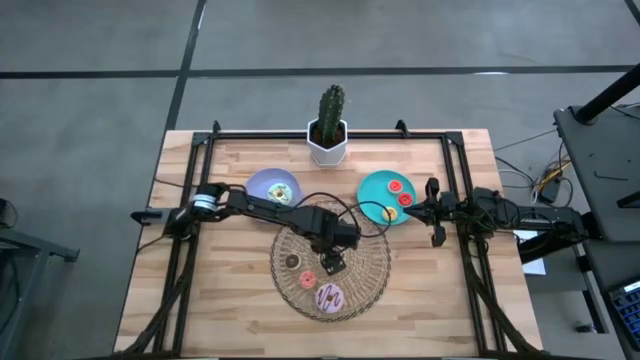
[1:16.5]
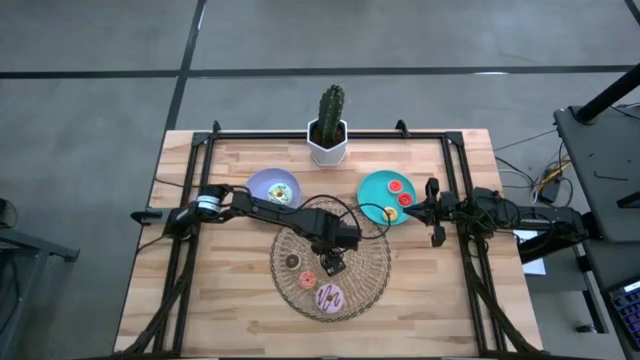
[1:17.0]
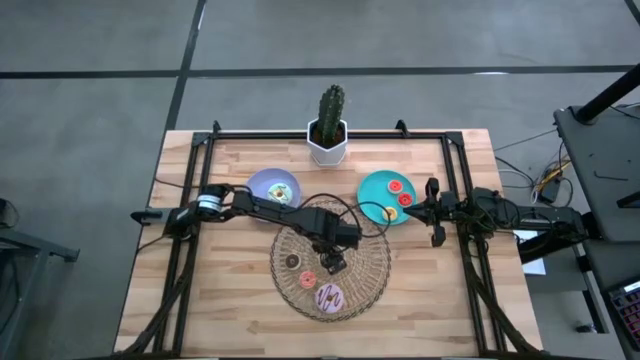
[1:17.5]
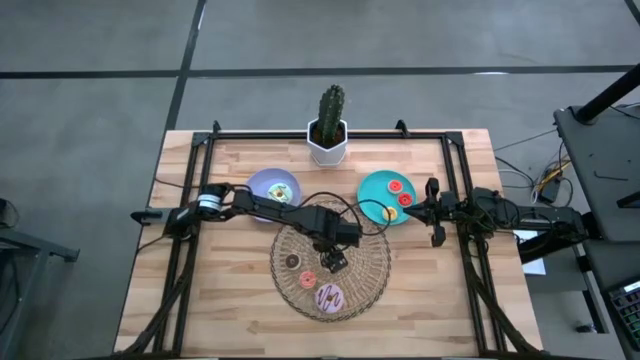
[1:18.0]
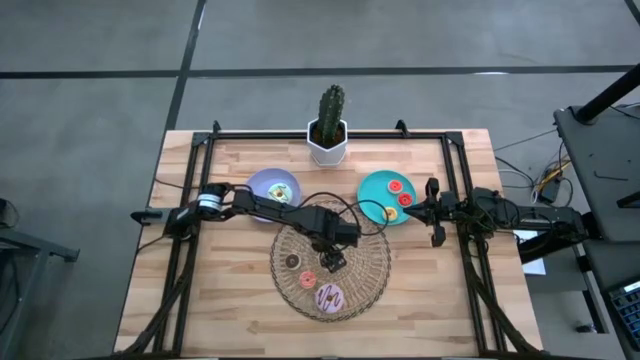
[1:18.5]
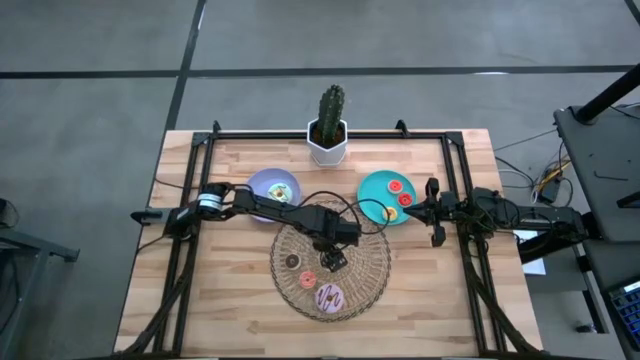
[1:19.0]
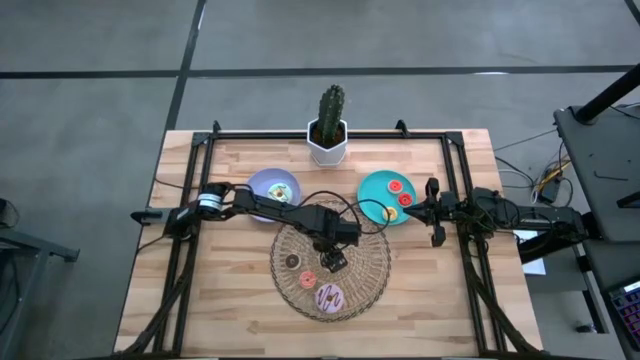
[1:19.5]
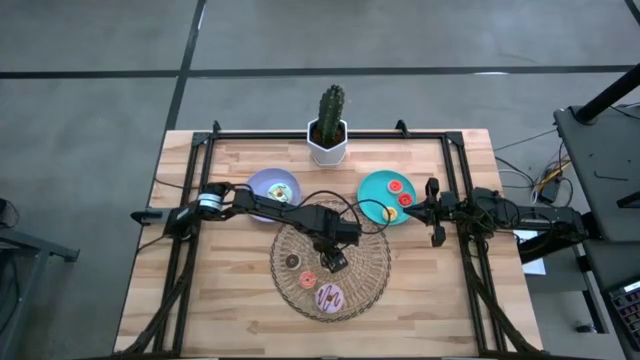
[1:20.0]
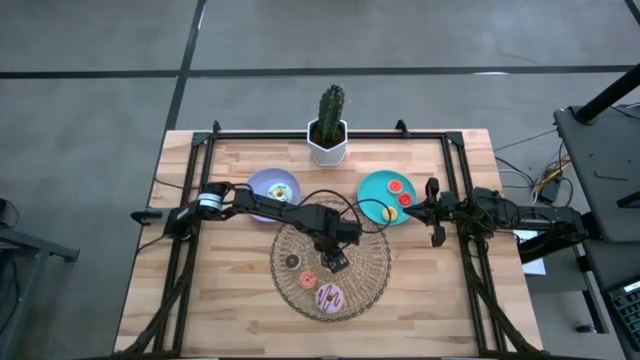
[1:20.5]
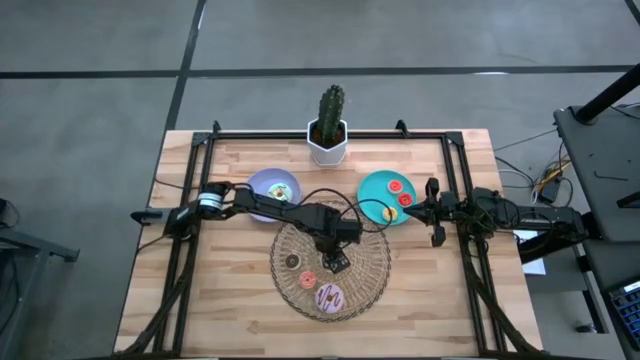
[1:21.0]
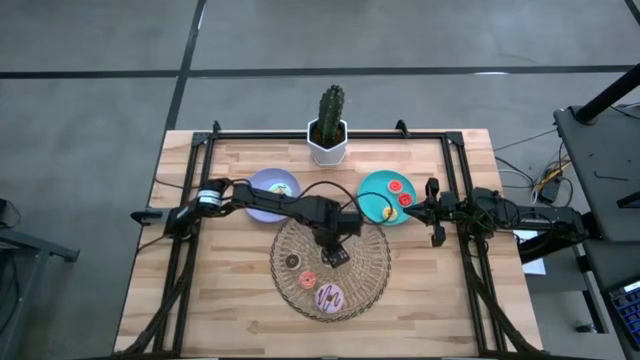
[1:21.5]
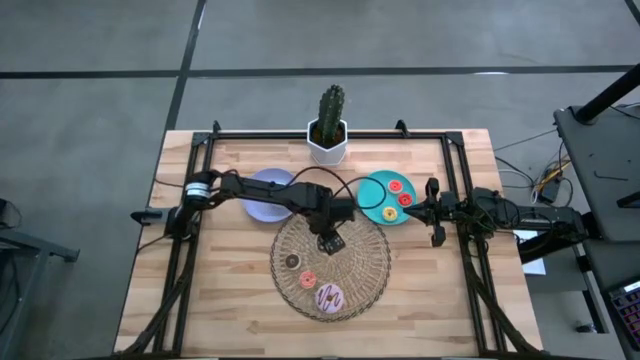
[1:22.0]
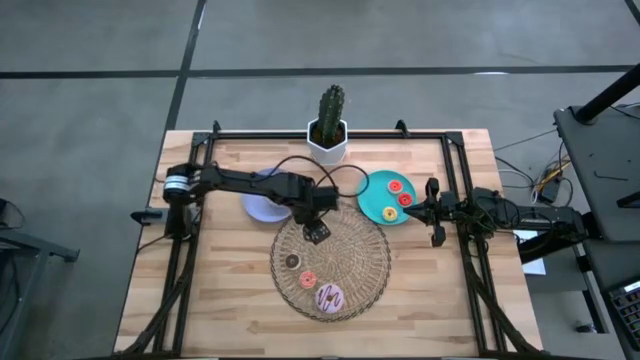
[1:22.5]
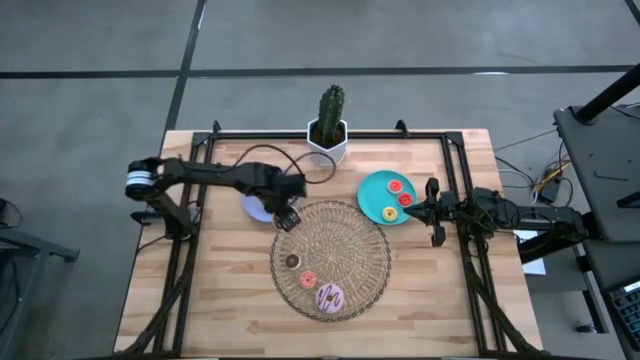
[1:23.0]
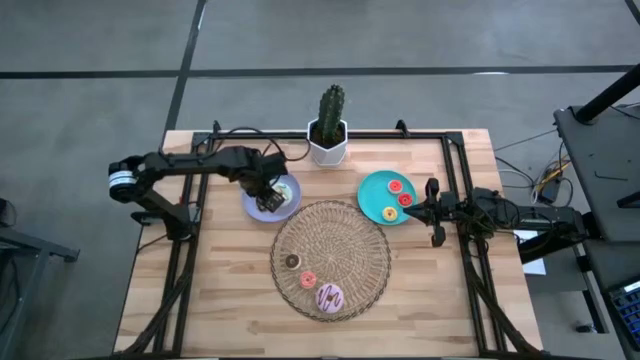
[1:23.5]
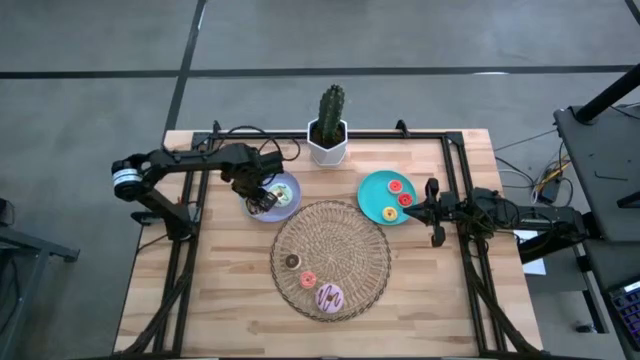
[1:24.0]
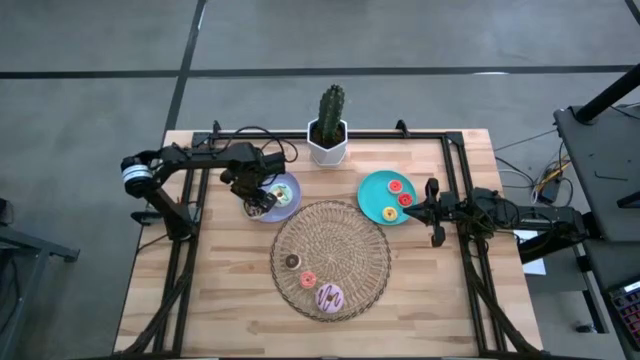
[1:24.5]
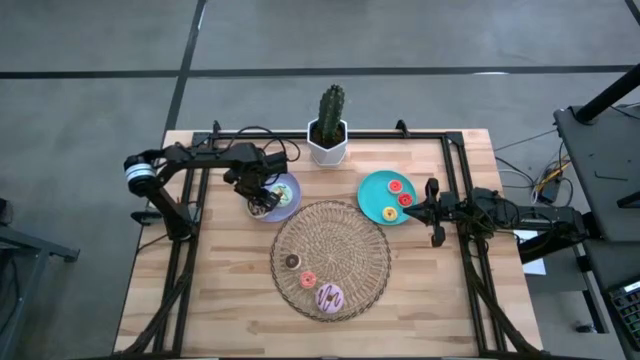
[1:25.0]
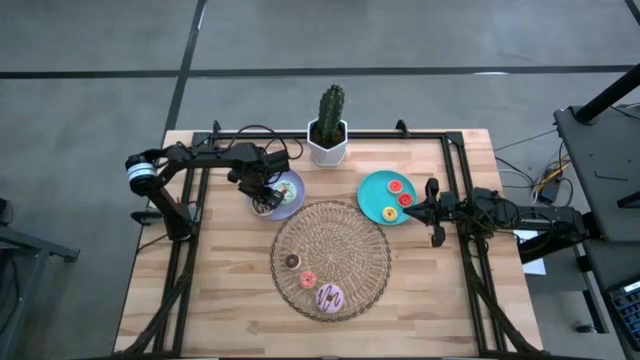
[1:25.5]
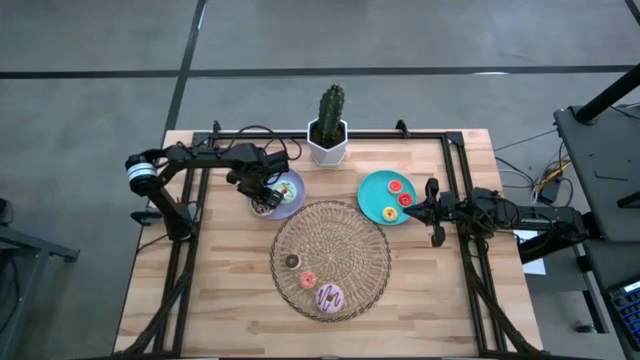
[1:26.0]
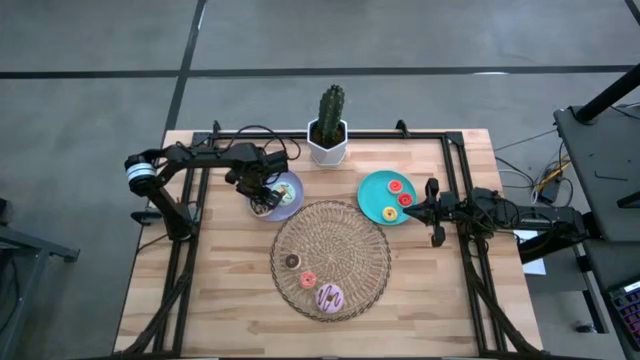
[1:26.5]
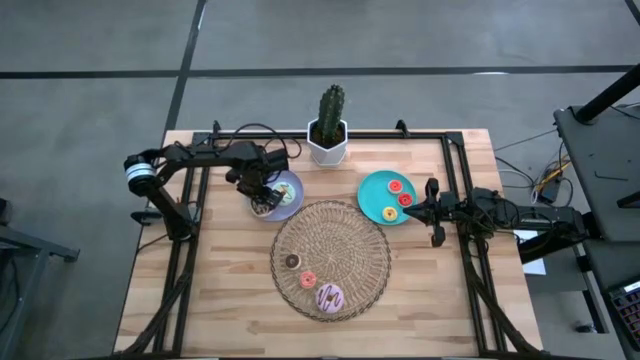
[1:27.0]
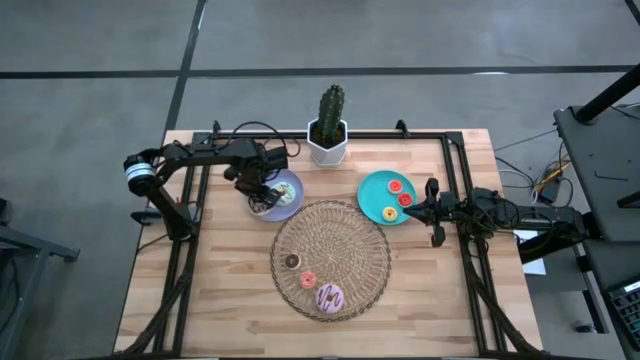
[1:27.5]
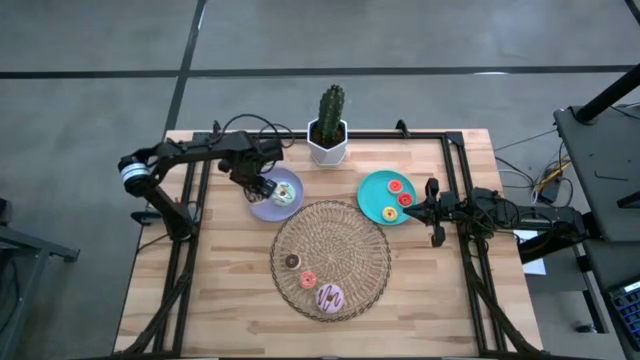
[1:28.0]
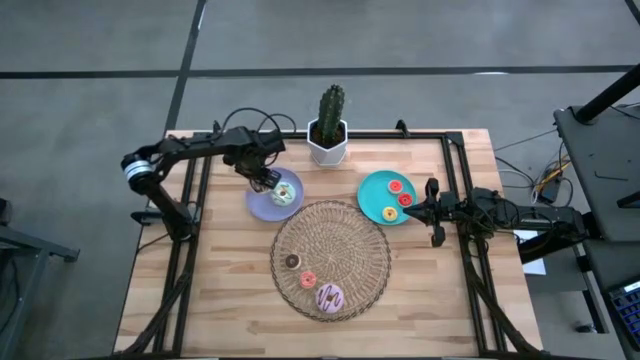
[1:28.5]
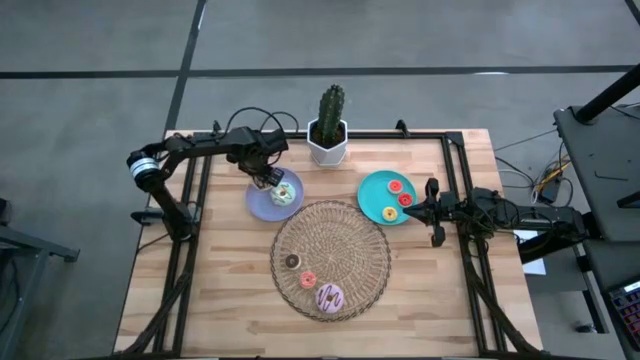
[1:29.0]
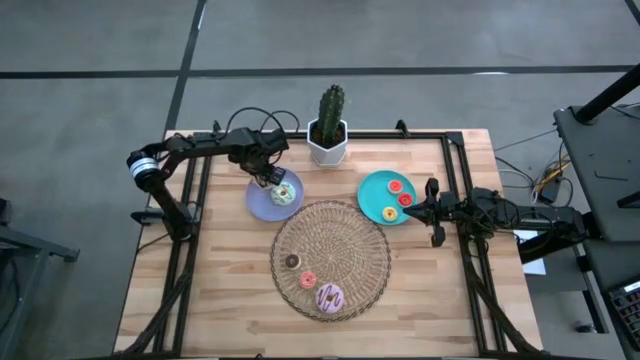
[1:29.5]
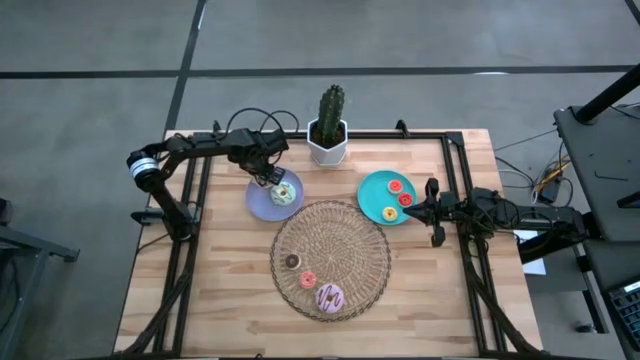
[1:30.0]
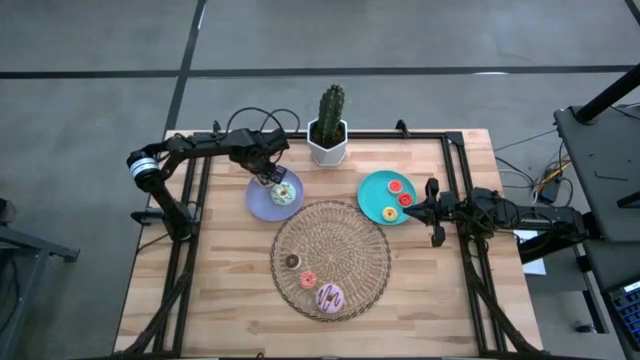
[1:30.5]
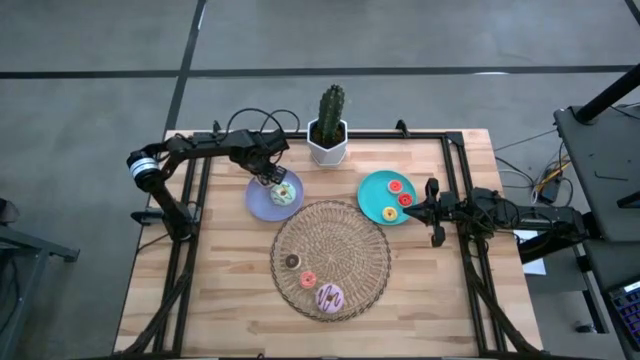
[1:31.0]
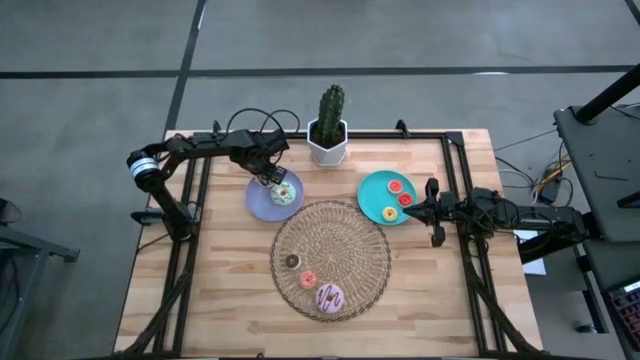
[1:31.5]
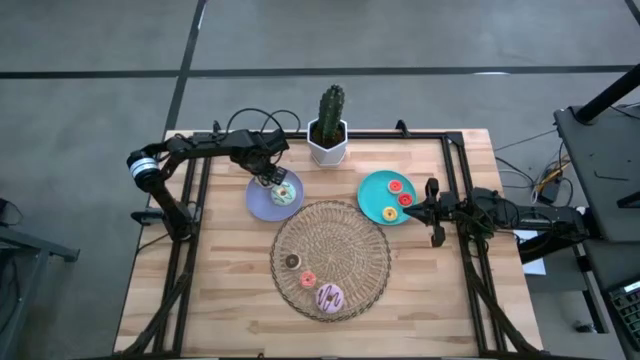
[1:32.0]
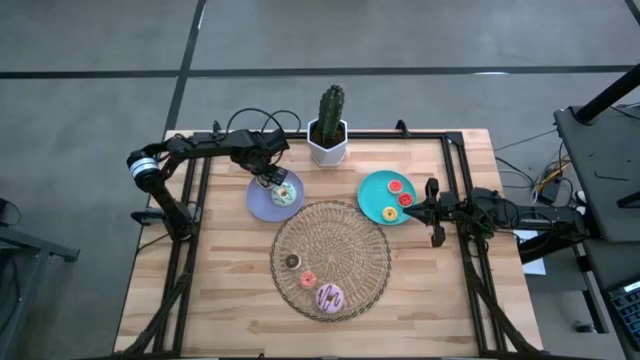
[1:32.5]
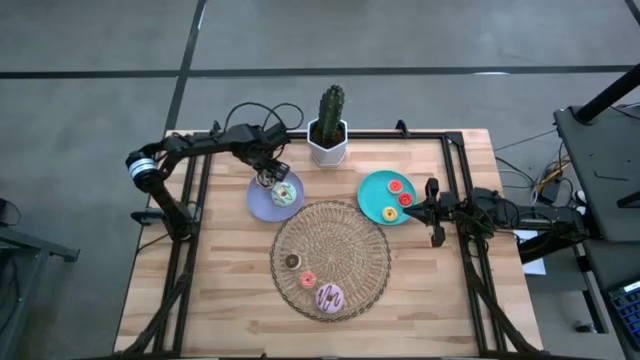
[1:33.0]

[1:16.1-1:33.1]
Task: Pick & Place donuts
Put the large black donut on the purple plate
